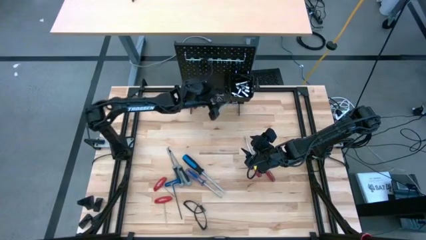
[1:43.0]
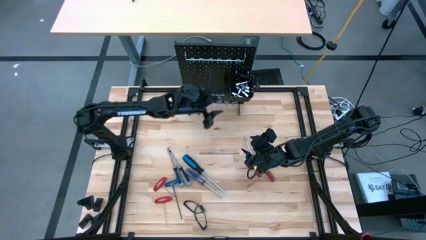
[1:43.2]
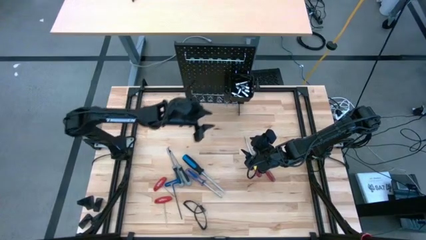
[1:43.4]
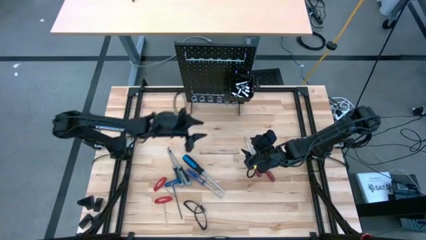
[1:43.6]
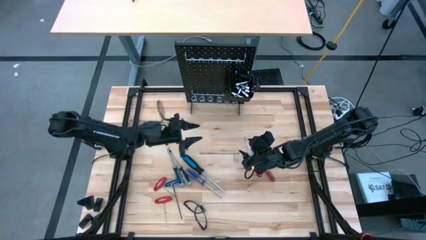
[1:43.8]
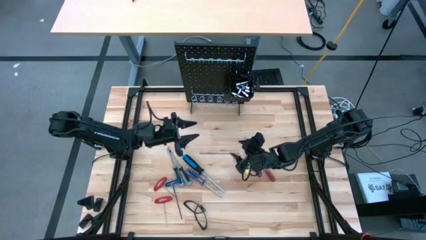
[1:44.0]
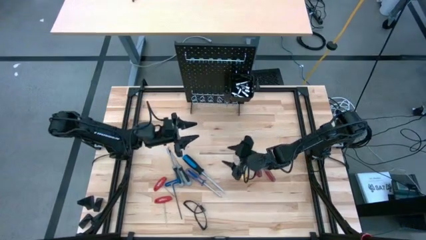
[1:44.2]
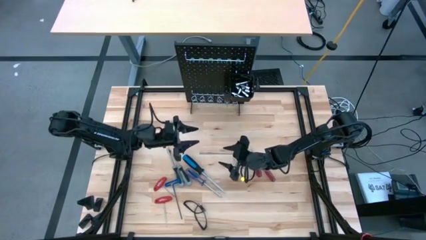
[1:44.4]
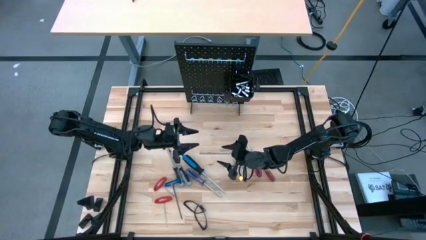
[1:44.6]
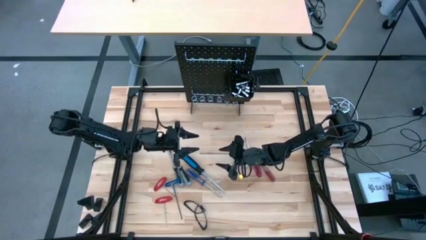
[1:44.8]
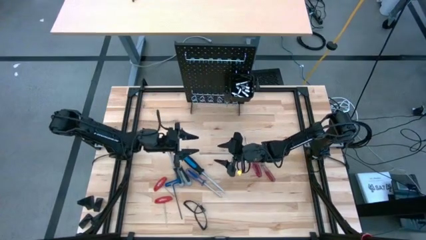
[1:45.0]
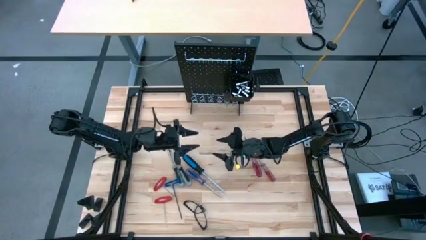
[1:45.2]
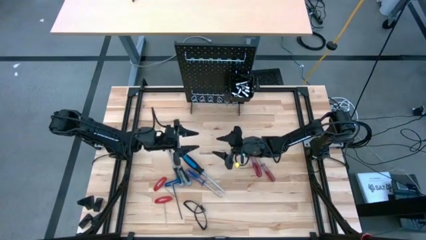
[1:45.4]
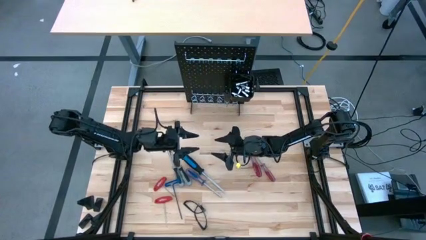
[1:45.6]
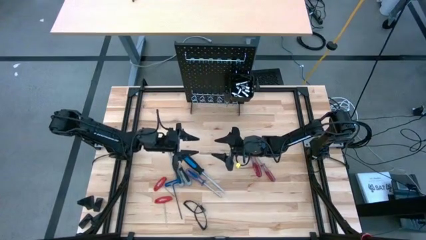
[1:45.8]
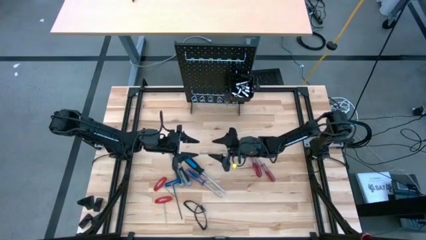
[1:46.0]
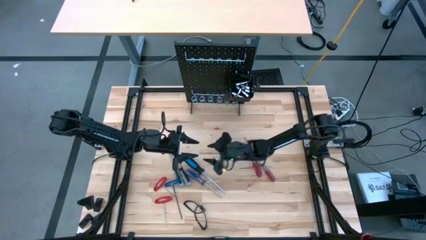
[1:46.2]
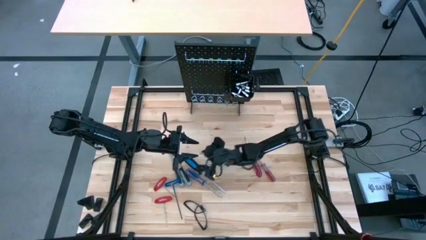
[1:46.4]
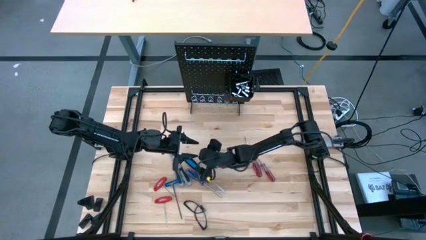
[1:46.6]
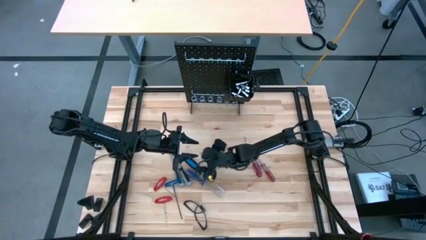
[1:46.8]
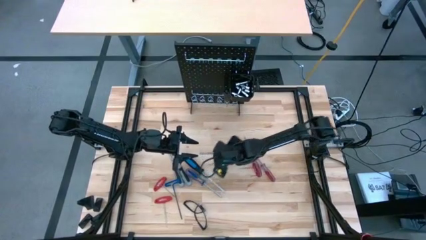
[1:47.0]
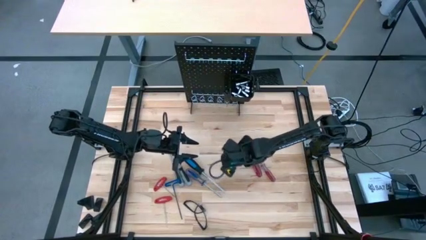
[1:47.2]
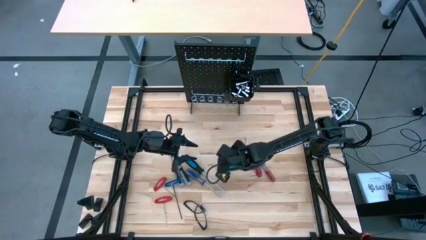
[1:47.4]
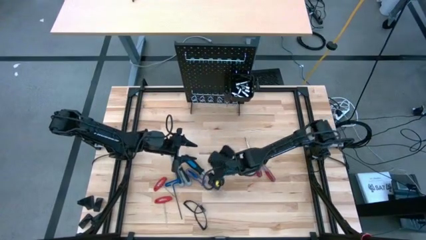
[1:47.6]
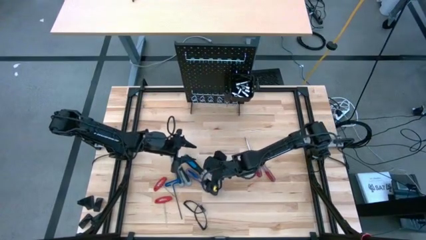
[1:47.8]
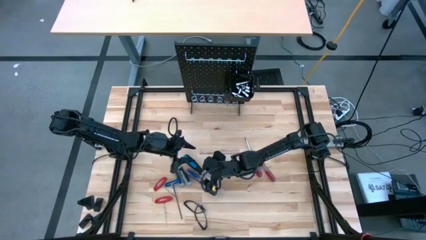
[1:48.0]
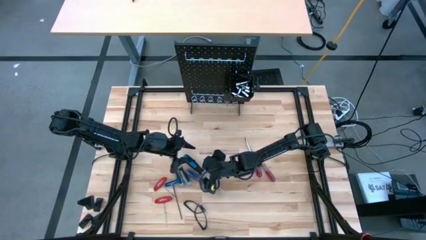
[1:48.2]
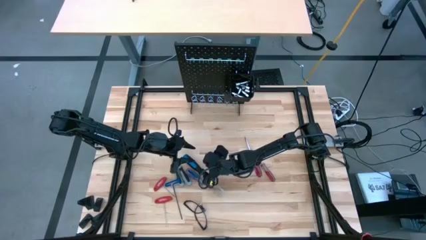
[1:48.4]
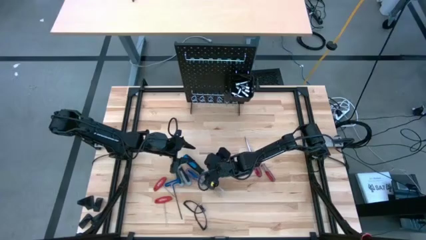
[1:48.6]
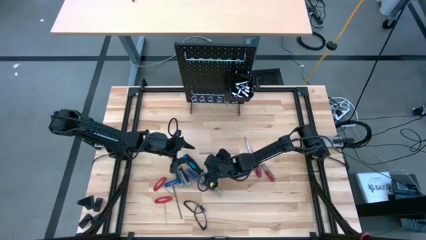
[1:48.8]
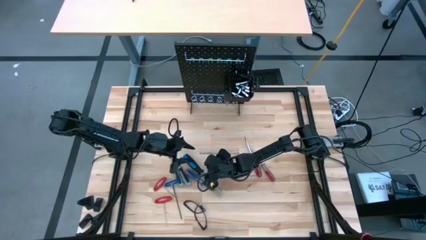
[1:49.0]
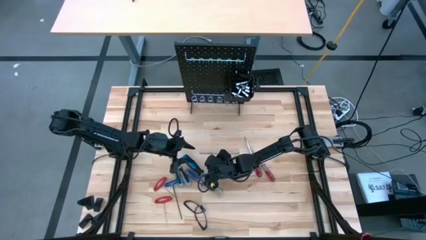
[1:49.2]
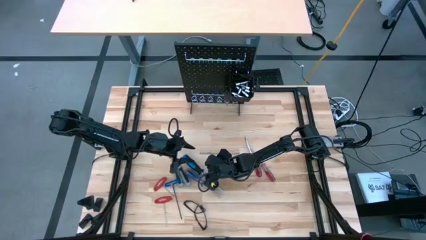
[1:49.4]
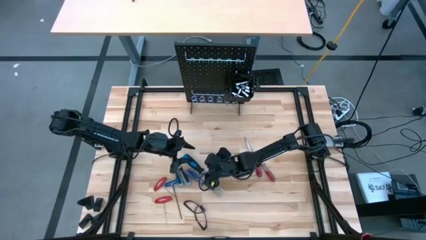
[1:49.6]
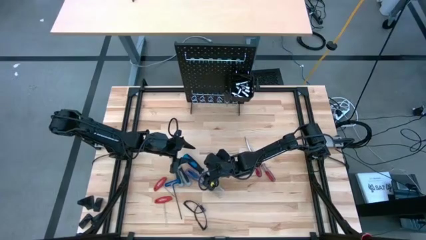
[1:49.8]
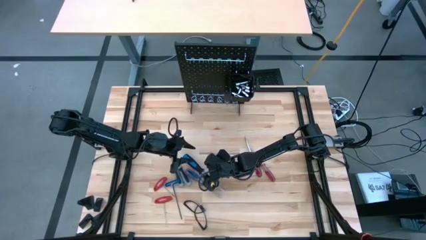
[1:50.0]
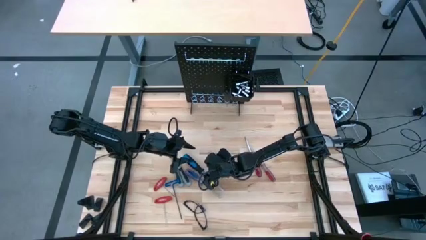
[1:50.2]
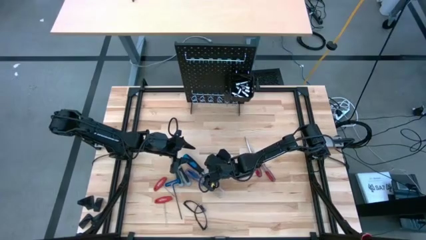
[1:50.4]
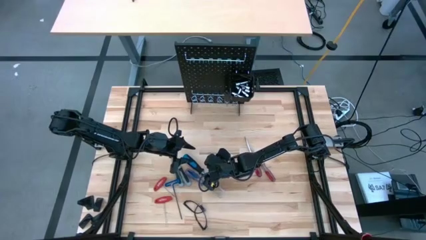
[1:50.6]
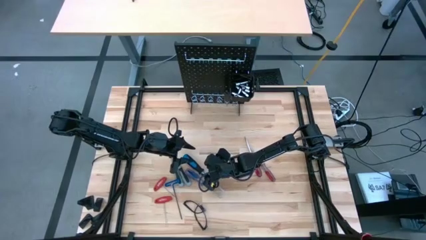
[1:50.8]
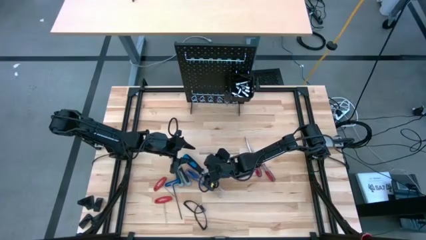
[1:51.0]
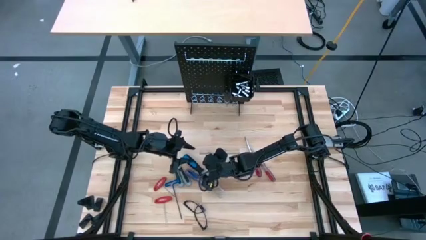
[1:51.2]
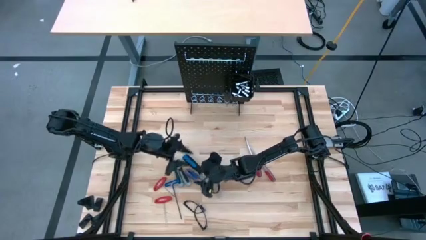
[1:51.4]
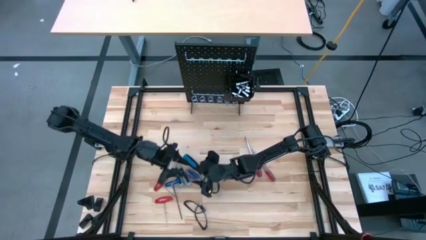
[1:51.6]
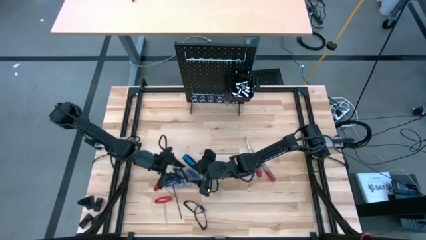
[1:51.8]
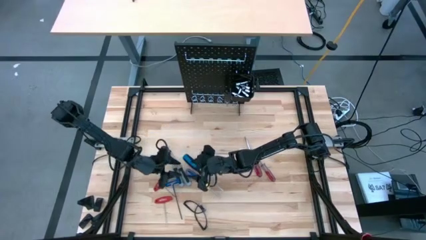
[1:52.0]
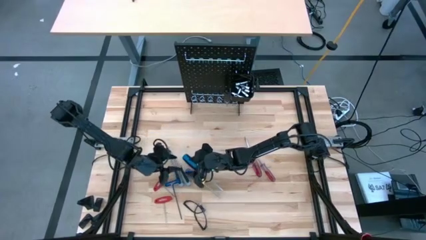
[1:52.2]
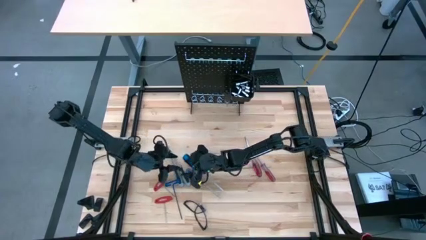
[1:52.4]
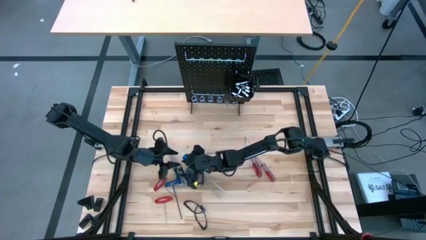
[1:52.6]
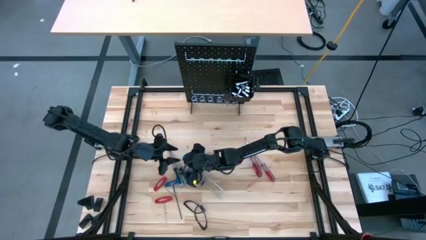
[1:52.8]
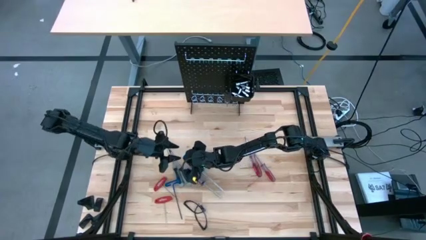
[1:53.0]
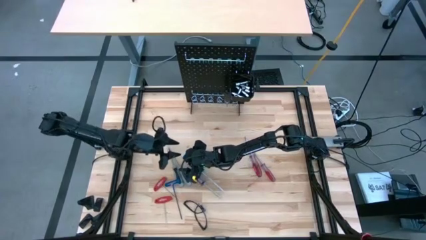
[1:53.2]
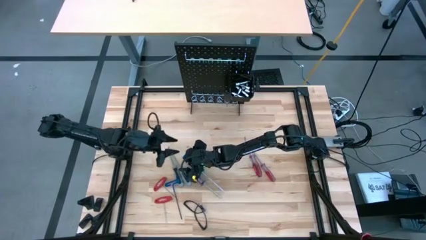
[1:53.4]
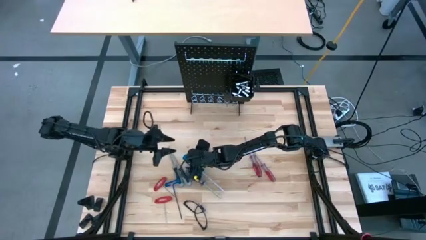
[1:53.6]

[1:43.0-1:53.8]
Task: Hang tools onto peg board
Hang the blue screwdriver on the pegboard

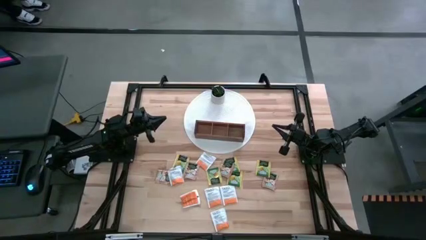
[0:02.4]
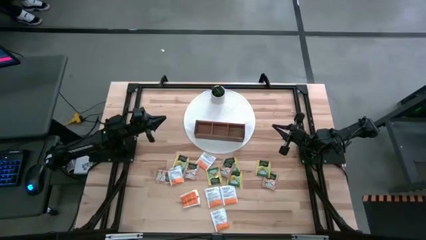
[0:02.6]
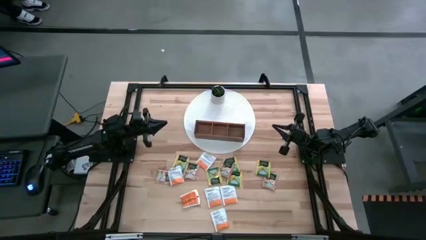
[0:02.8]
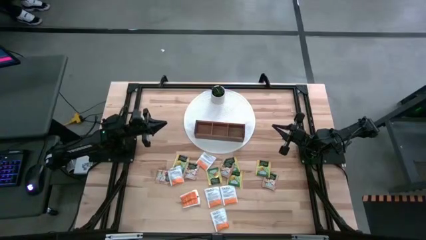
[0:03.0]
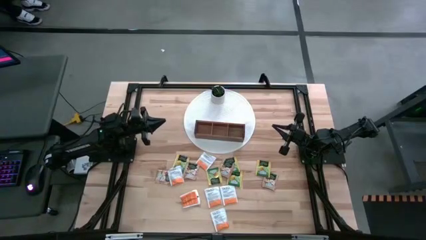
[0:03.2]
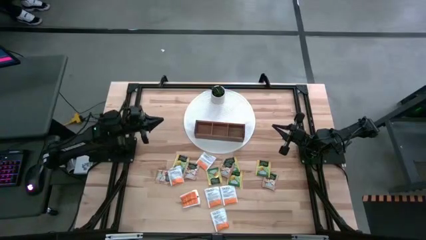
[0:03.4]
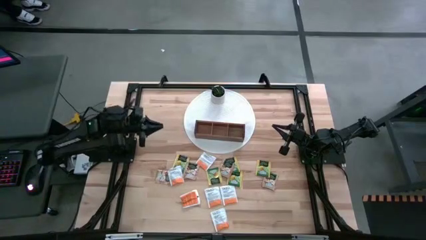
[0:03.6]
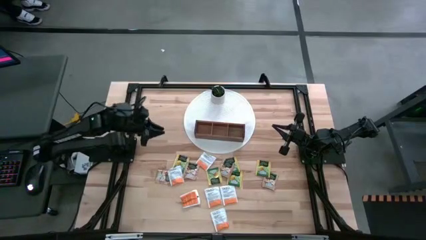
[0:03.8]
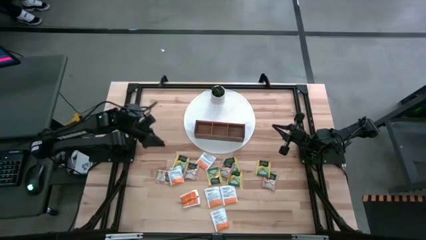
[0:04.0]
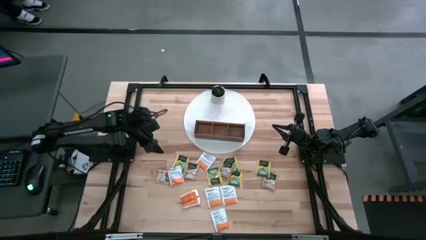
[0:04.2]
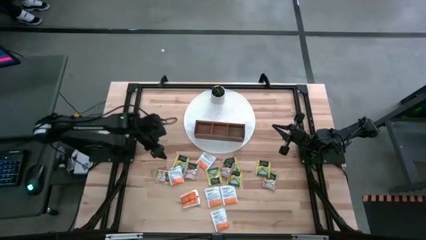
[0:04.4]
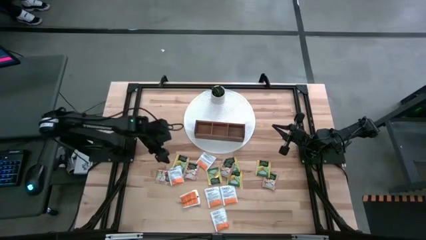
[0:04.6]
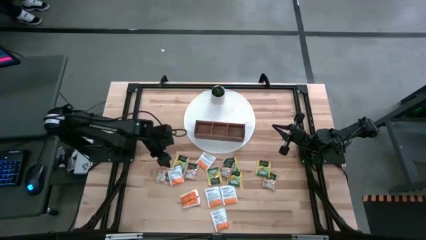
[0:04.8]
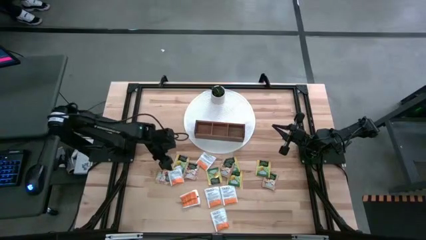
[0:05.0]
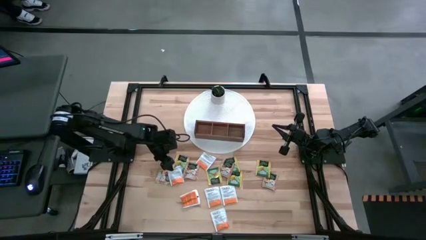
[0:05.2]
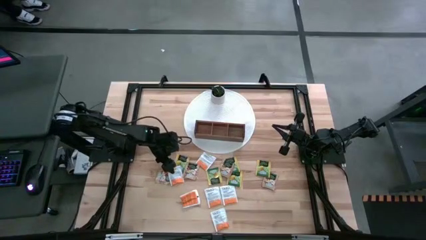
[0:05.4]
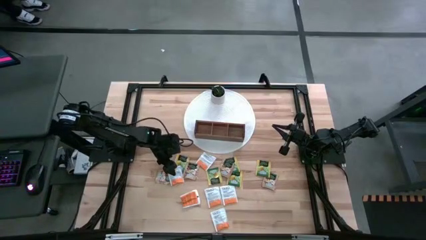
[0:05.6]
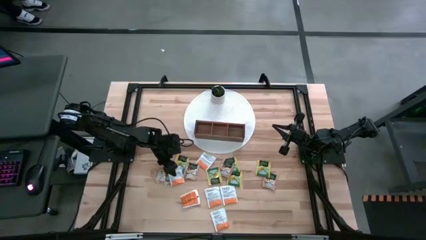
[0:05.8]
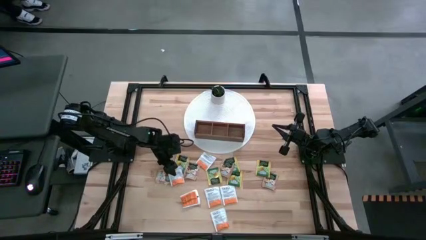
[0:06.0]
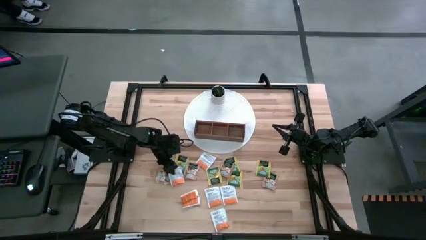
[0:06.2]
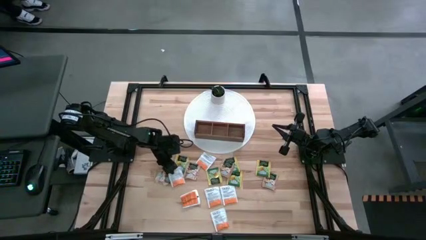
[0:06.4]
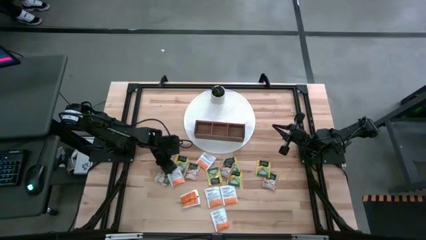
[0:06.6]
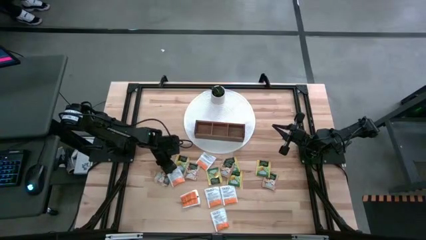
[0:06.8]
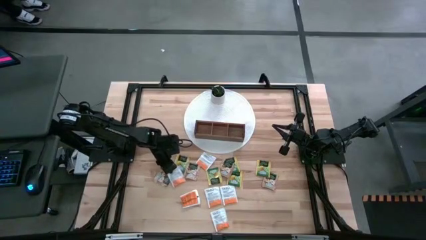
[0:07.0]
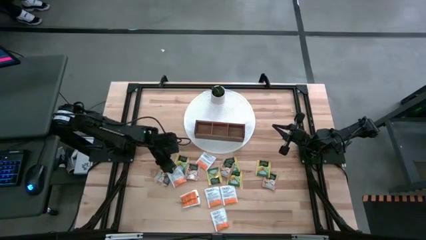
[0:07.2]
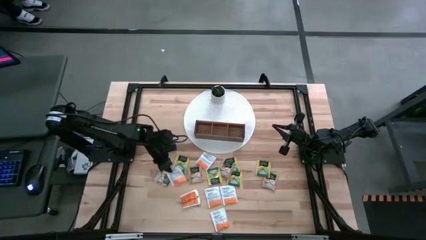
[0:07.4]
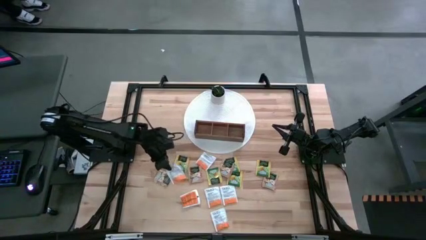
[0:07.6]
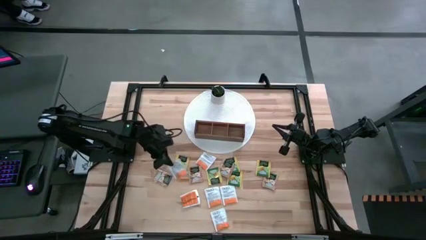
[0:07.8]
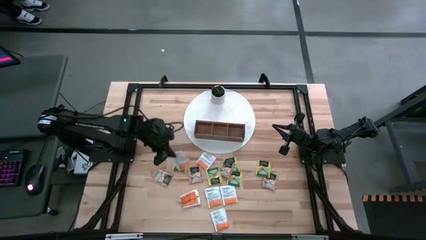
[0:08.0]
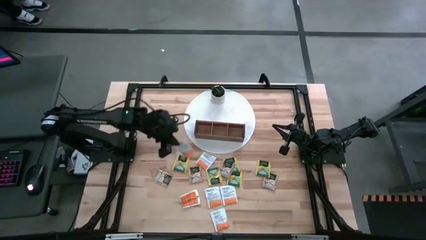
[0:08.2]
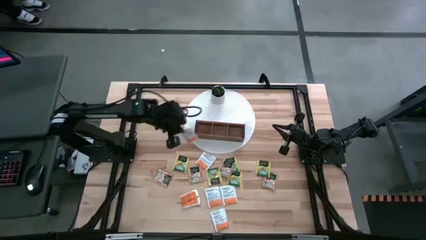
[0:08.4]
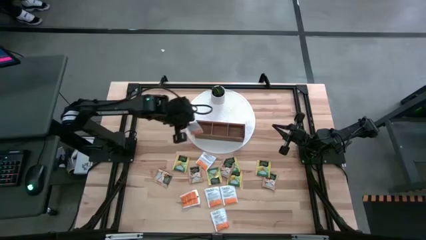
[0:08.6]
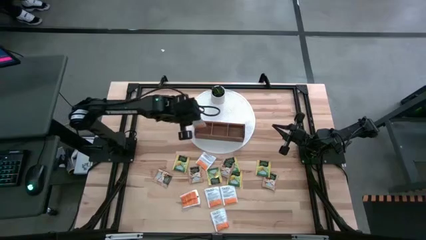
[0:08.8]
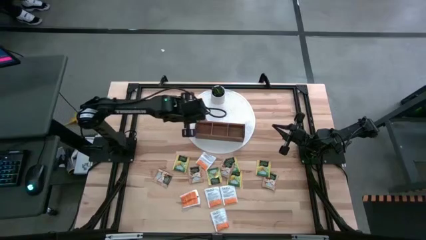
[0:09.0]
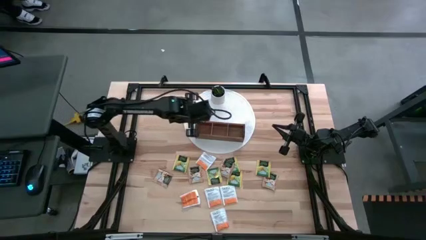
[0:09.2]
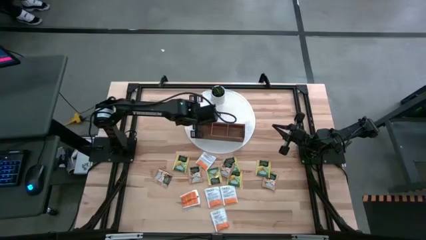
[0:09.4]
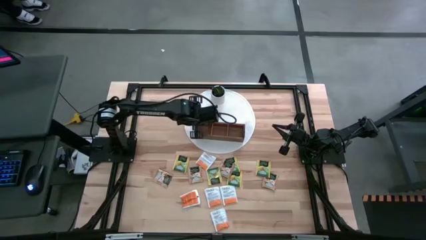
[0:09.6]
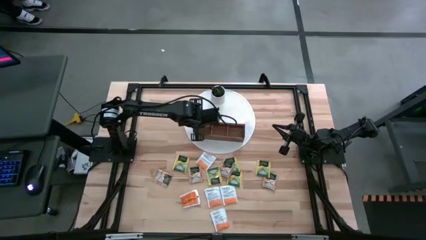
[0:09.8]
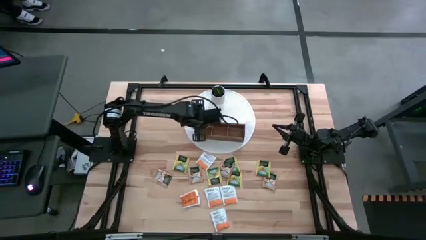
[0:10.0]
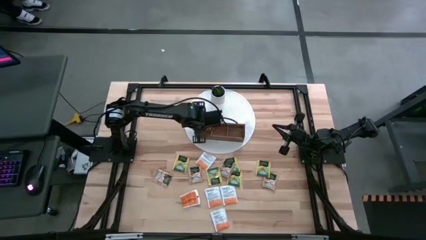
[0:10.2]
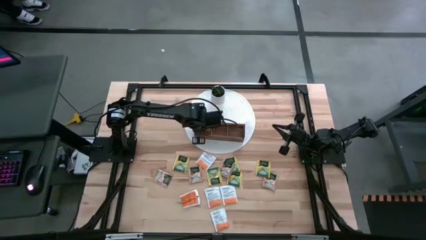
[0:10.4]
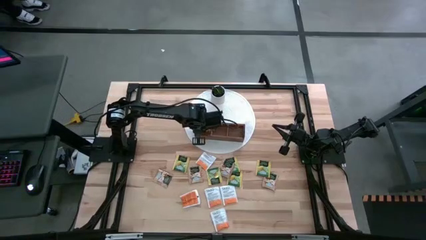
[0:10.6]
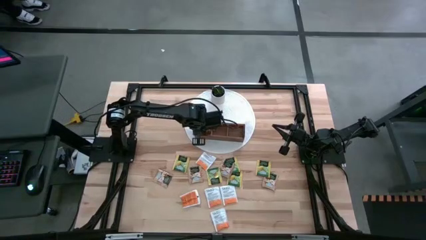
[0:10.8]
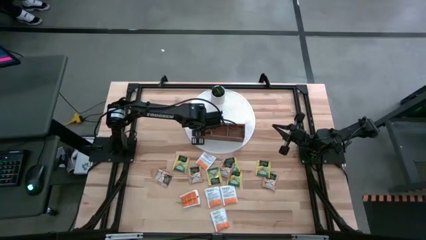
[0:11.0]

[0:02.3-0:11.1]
Task: Pick & Place Tea
Put the white tea bag into the left section of the wooden organizer
